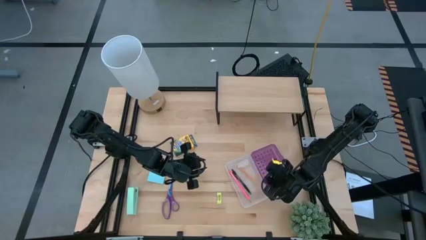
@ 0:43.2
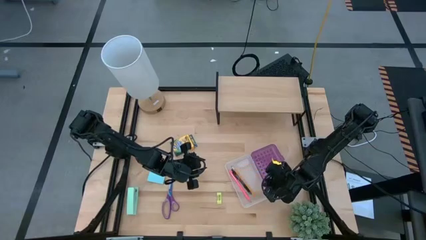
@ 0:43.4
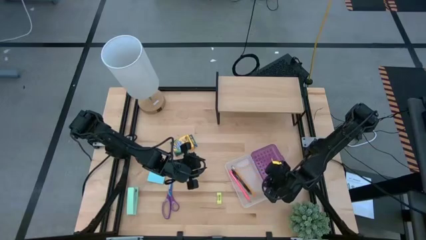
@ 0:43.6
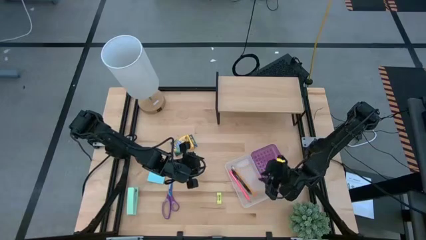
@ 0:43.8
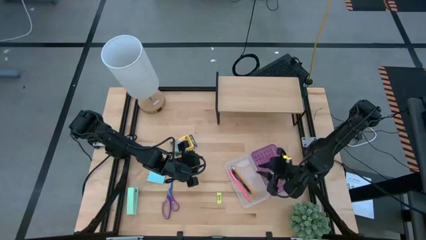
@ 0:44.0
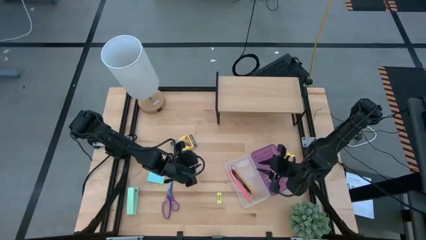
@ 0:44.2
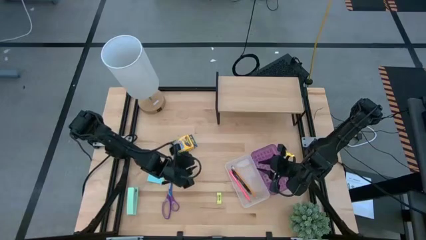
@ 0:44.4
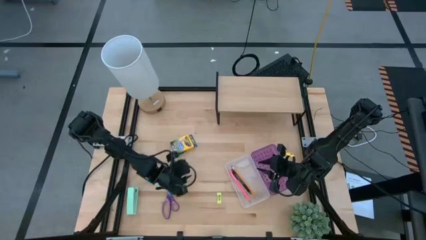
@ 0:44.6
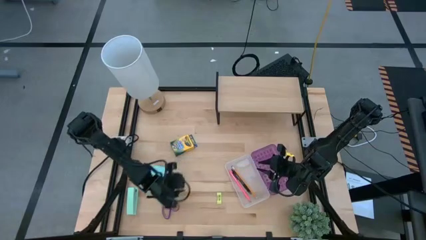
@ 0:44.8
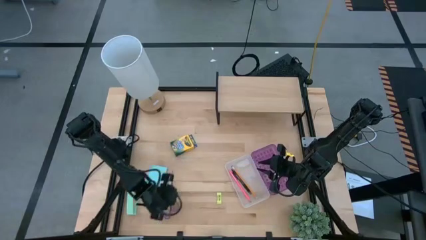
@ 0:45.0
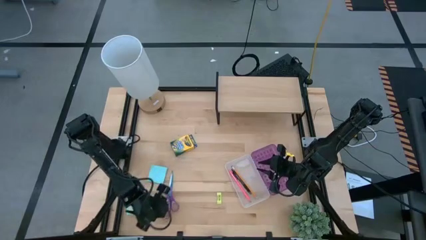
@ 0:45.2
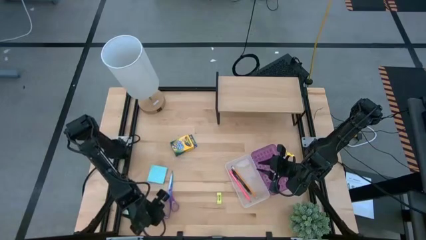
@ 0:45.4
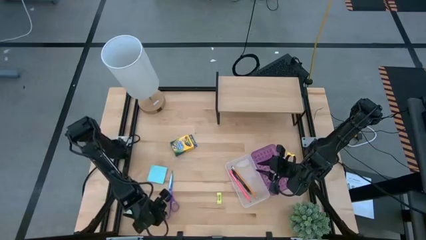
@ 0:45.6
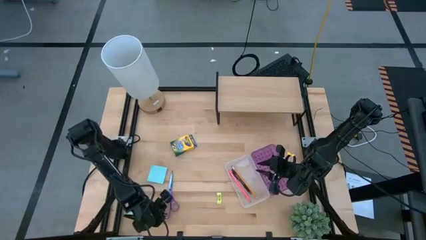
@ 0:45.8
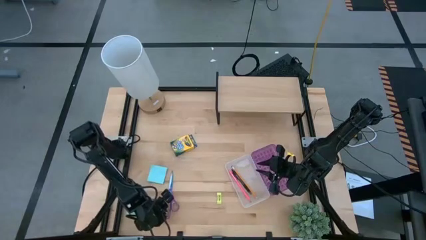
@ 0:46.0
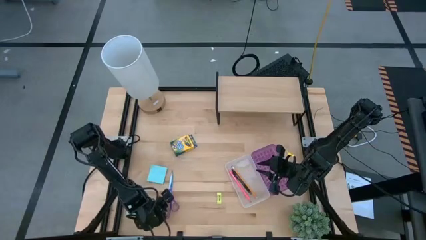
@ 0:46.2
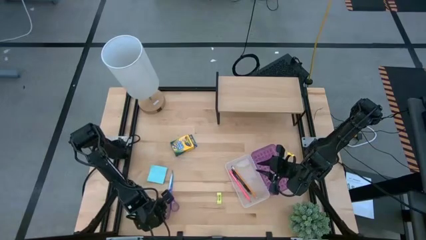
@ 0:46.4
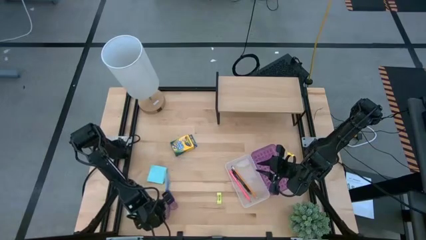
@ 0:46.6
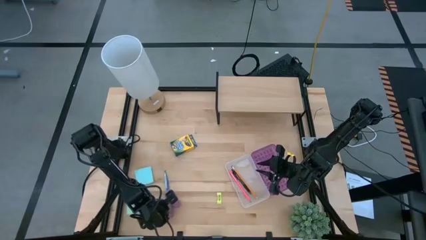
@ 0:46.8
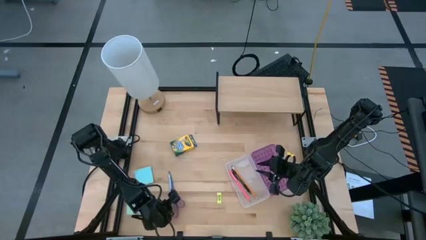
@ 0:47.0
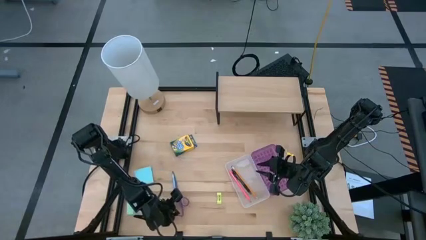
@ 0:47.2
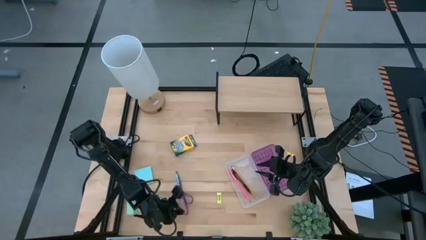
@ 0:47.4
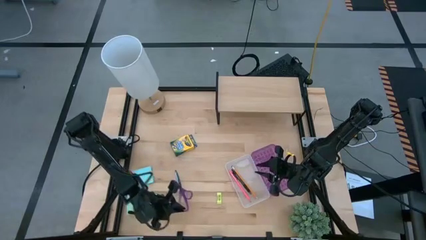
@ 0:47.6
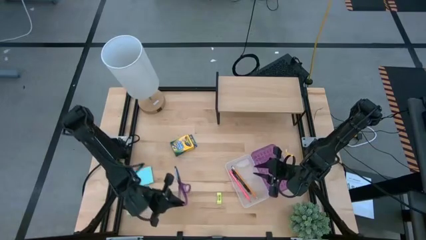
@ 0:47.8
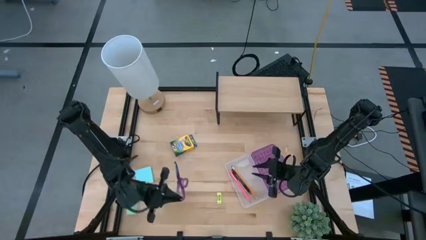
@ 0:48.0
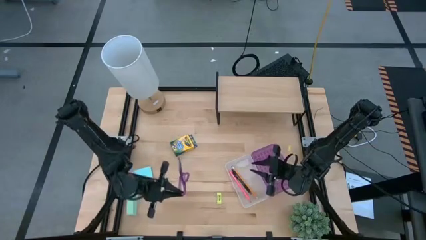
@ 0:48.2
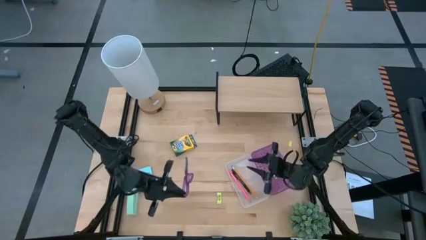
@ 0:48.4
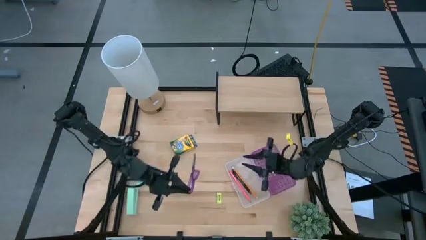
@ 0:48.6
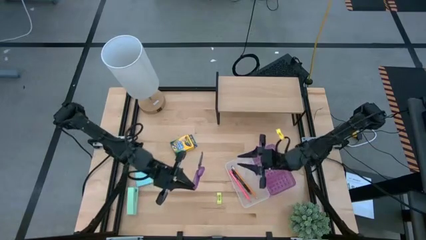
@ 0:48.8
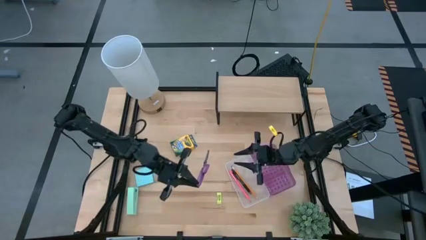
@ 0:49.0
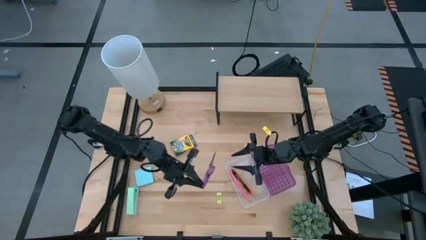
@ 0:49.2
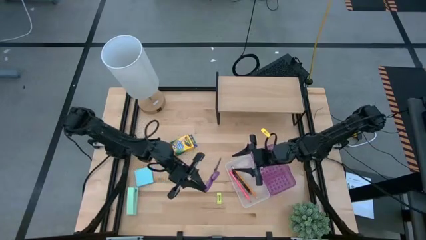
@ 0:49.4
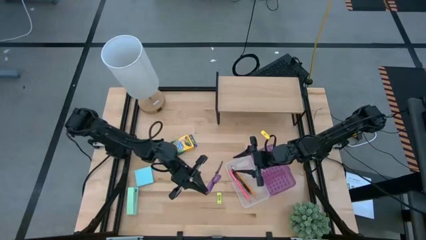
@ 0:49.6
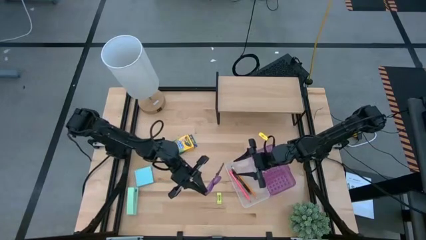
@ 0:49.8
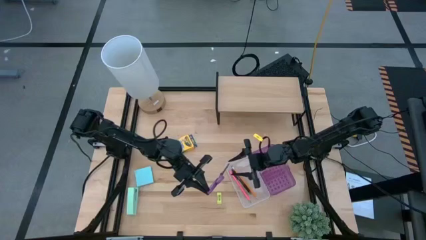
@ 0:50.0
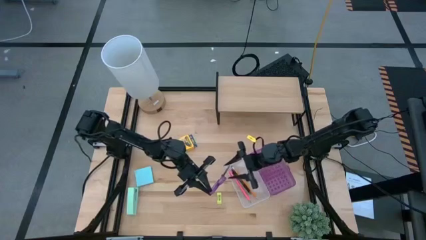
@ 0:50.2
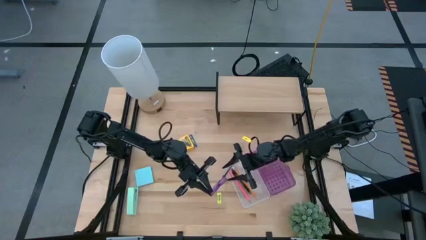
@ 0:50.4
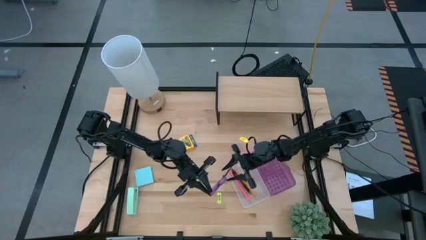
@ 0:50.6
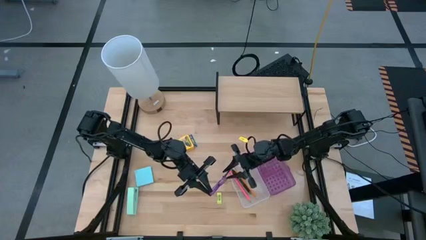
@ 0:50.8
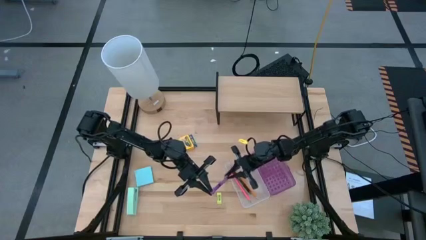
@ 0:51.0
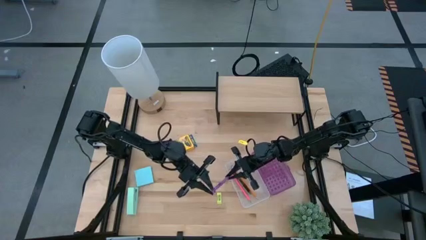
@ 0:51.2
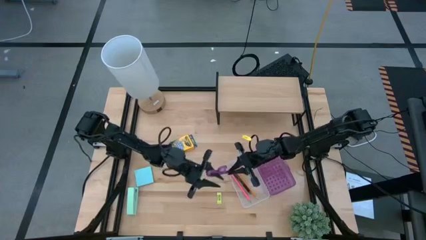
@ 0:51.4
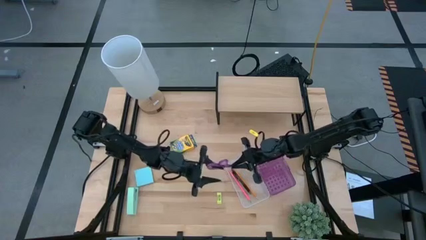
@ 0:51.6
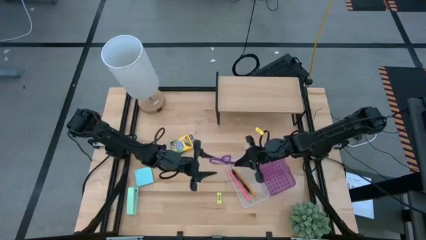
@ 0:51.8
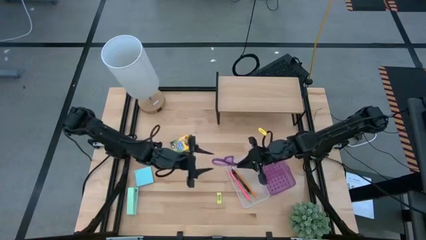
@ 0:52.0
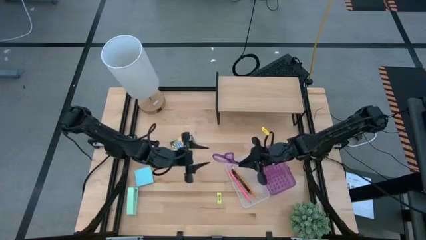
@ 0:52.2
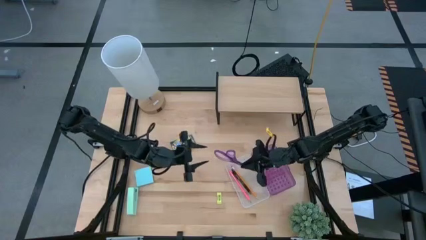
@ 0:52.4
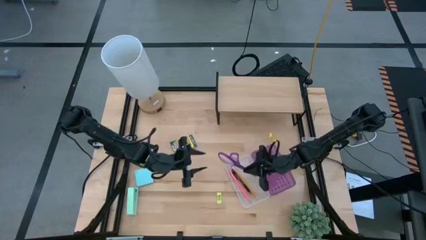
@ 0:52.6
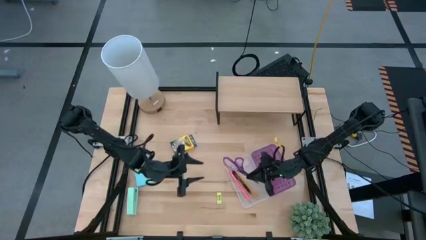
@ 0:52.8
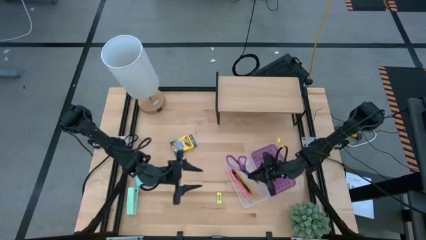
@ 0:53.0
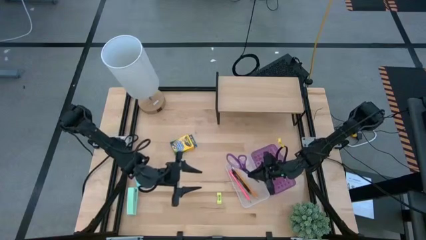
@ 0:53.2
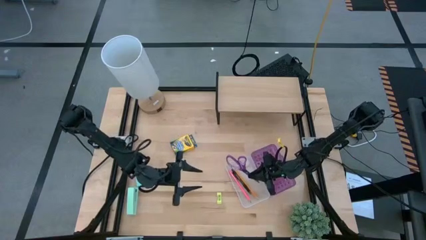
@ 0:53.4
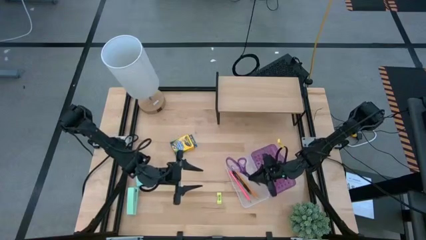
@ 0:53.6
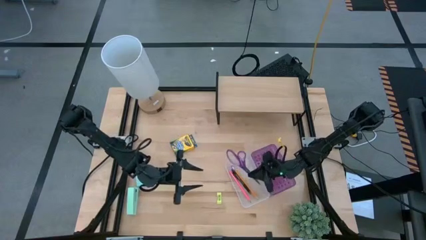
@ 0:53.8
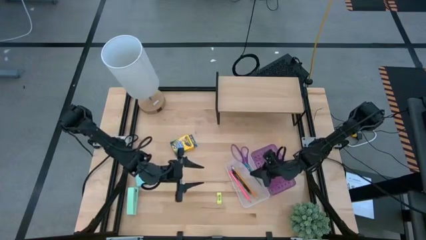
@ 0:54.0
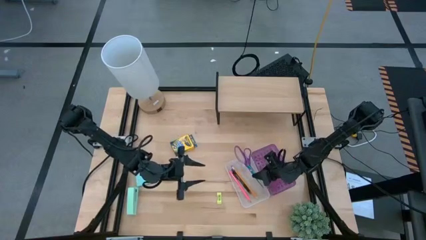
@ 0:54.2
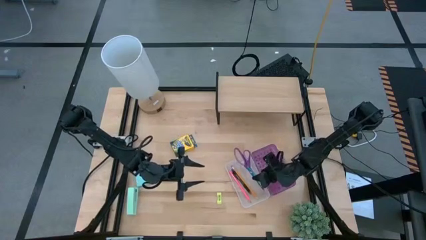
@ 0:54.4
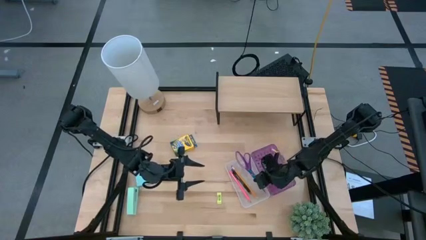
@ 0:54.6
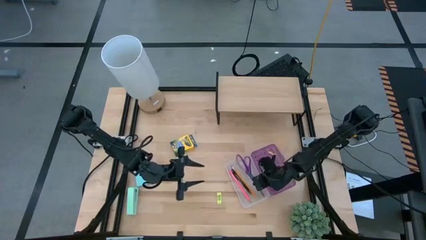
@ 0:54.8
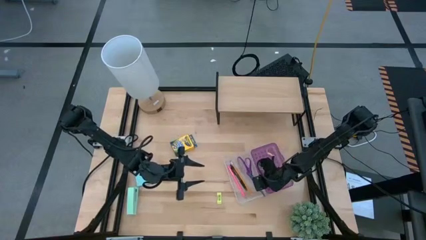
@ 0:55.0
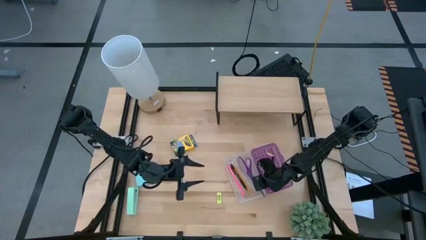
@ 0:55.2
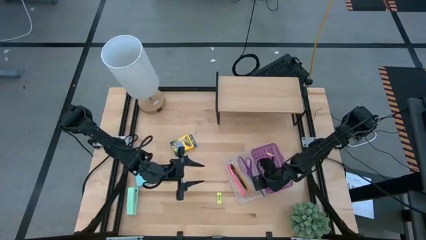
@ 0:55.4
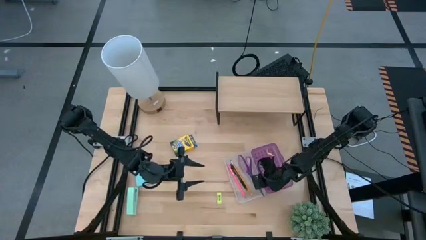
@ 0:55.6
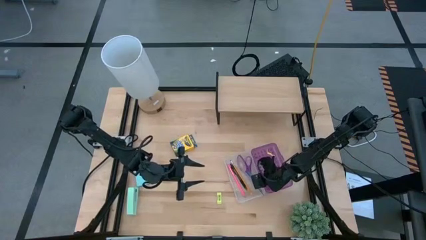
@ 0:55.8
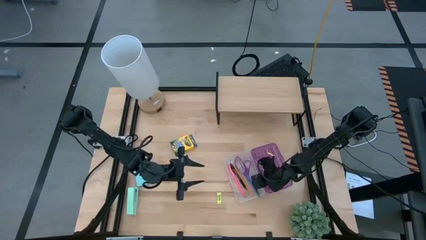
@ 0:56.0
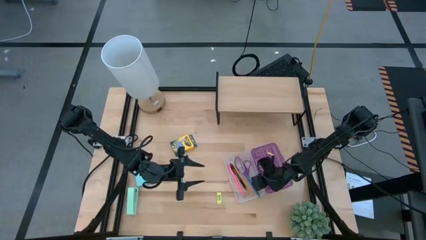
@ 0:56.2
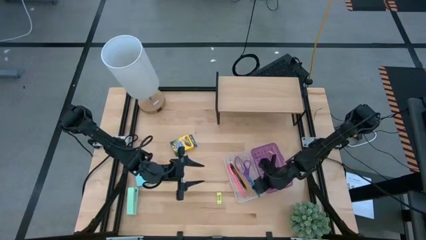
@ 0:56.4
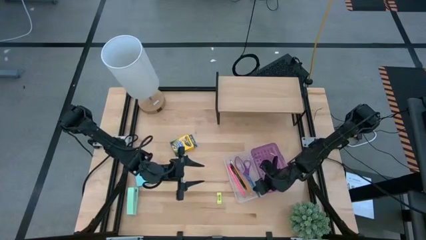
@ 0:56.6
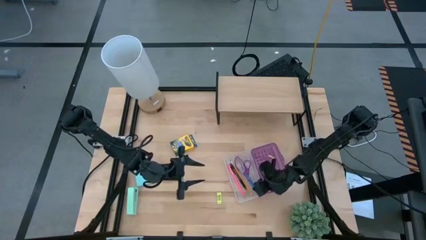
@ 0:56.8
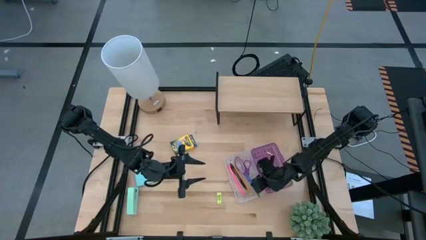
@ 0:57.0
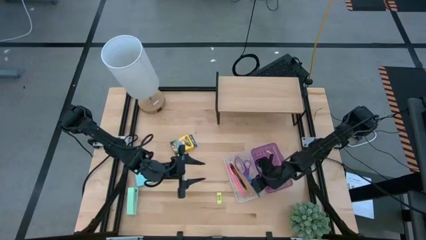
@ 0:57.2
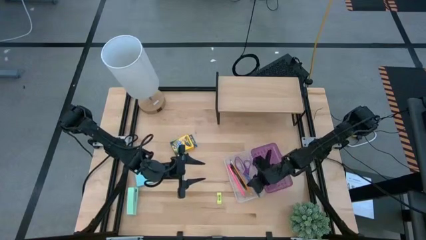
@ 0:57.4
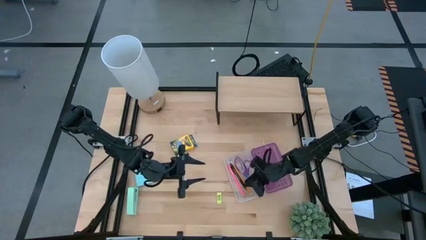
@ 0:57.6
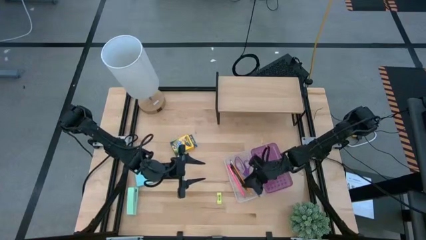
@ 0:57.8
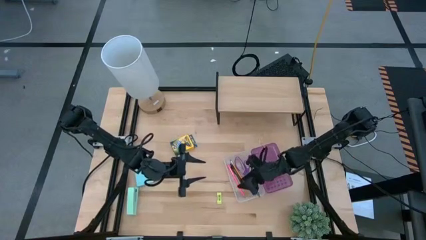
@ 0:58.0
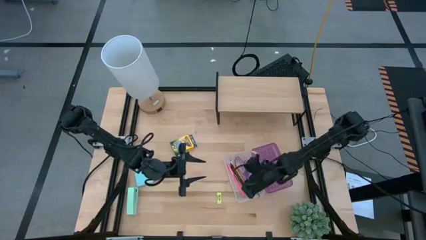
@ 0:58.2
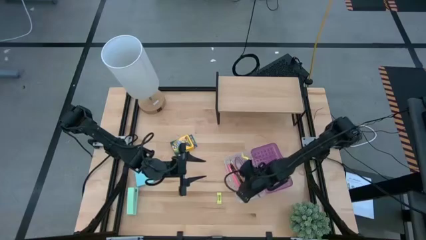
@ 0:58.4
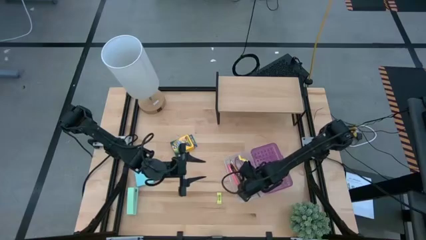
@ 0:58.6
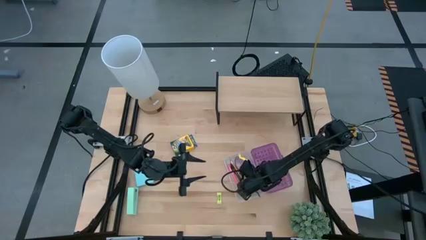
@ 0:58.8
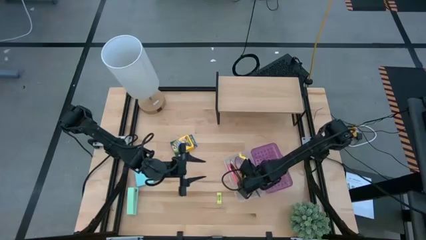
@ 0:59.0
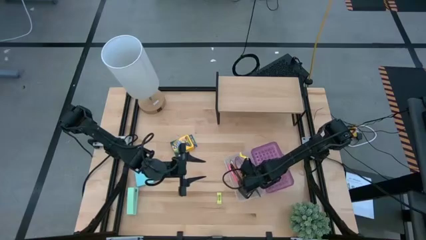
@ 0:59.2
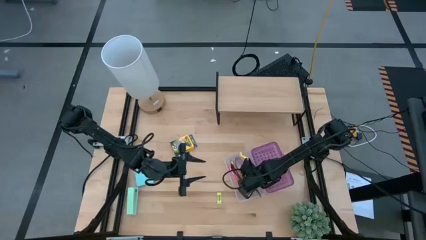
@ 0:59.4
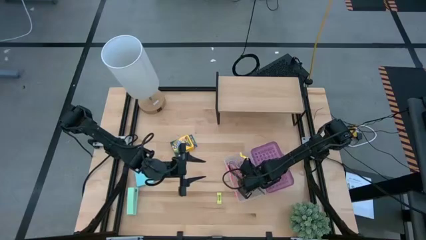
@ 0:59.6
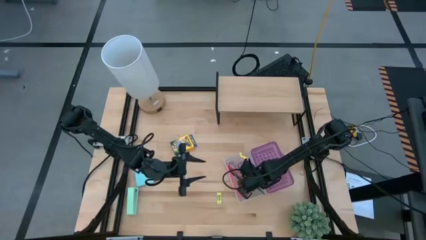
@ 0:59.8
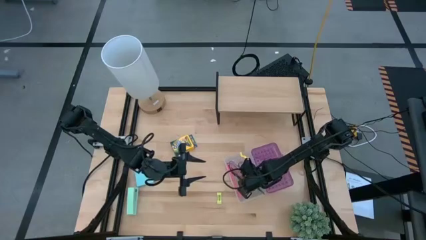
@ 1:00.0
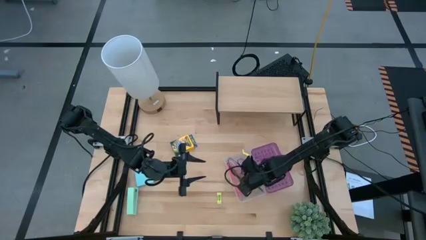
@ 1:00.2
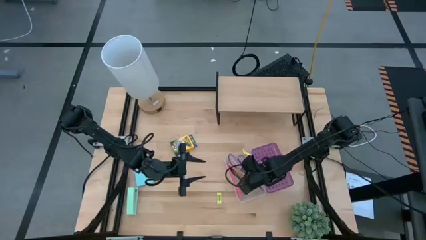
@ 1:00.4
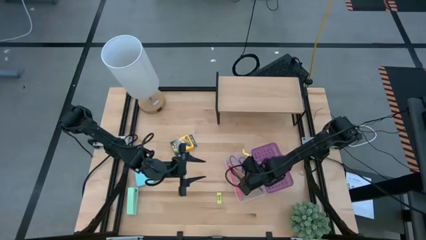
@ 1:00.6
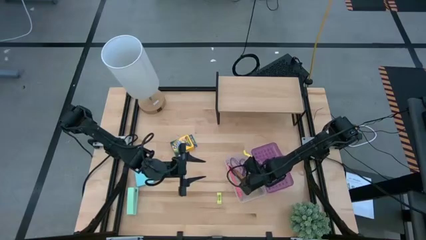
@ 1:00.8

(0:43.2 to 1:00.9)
Task: Pack school essentials
Put the purple scissors into the purple supply box
